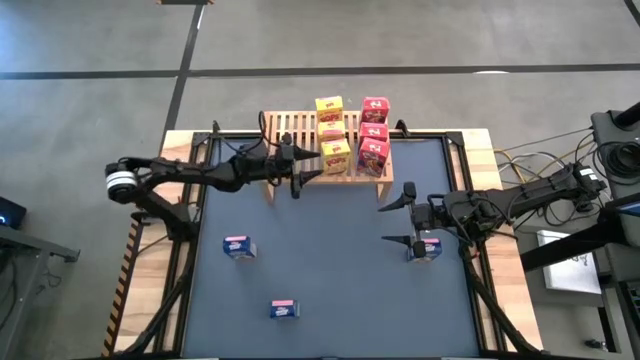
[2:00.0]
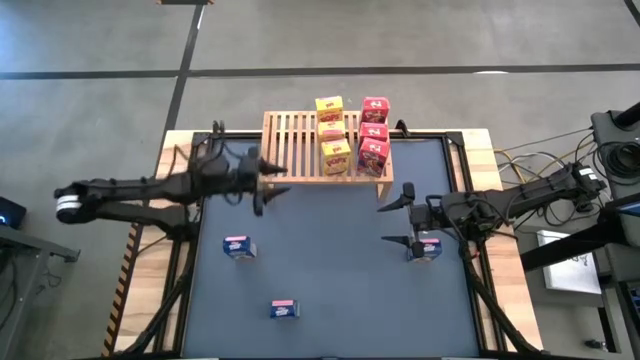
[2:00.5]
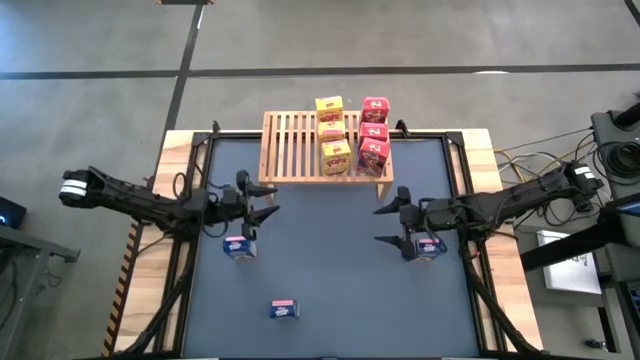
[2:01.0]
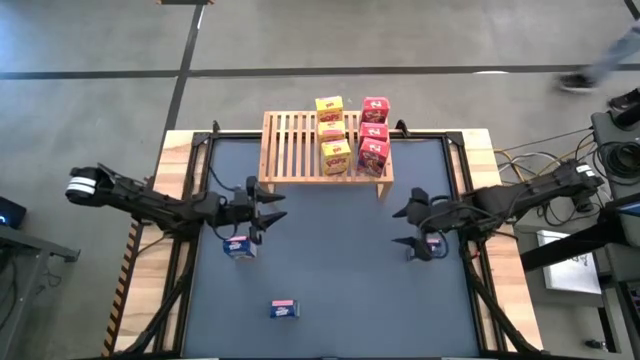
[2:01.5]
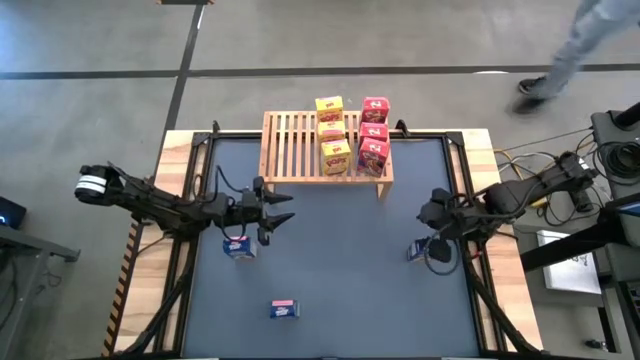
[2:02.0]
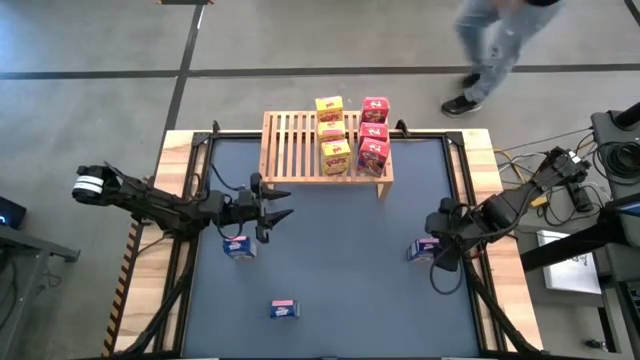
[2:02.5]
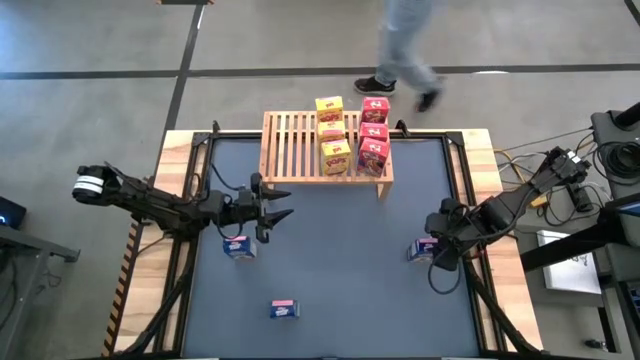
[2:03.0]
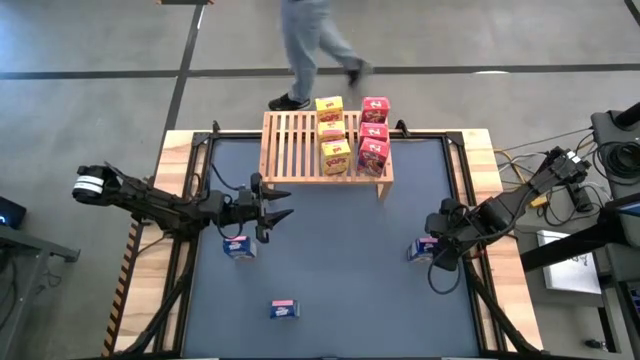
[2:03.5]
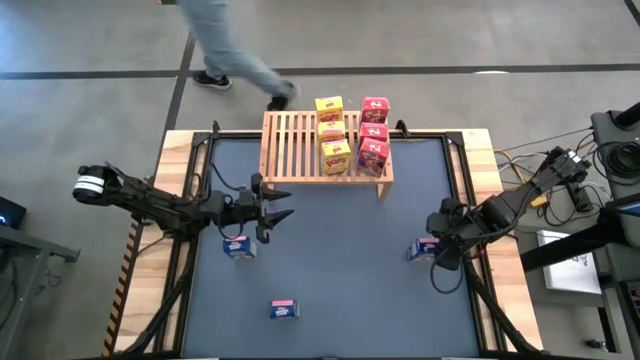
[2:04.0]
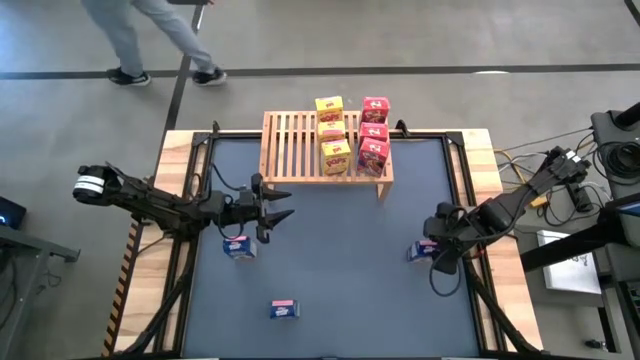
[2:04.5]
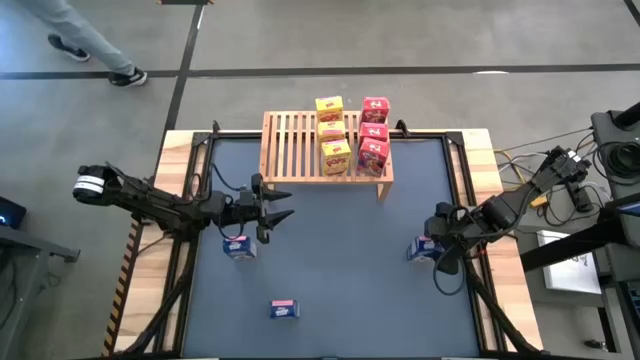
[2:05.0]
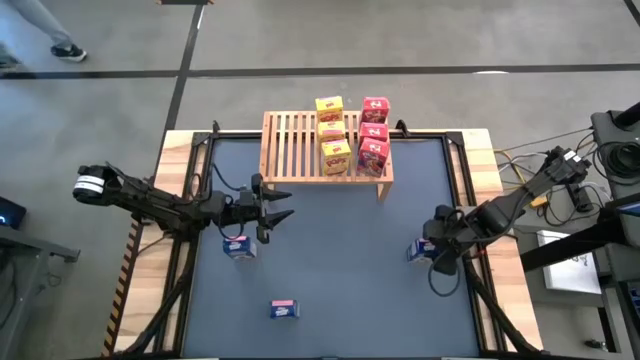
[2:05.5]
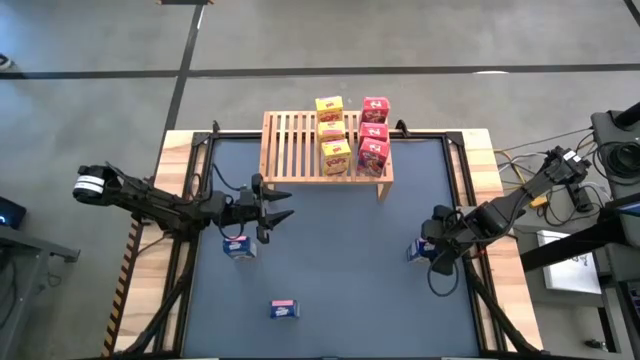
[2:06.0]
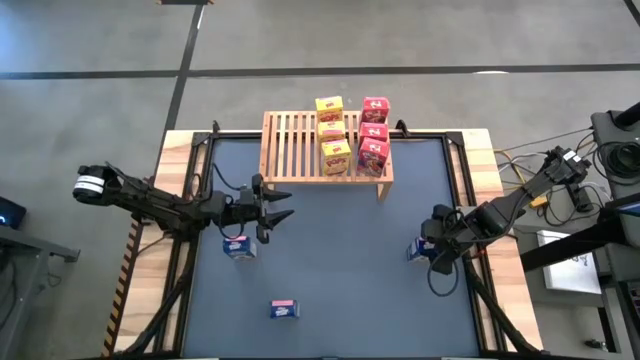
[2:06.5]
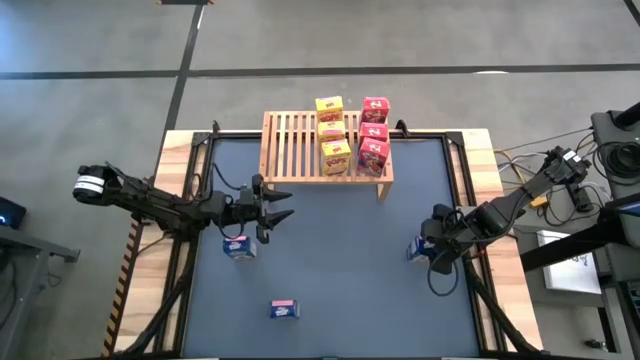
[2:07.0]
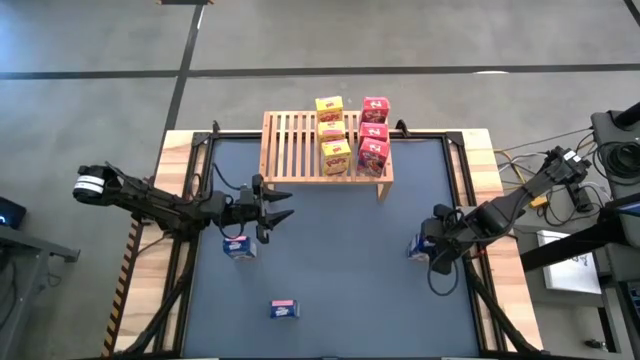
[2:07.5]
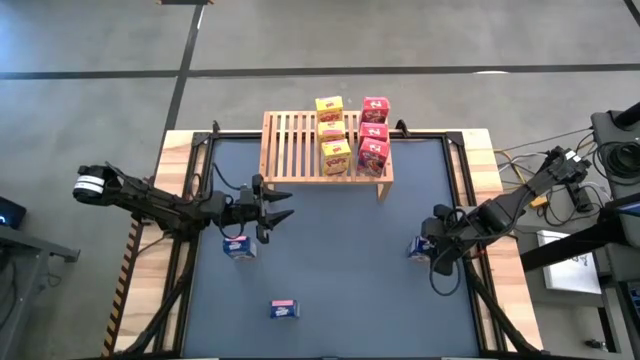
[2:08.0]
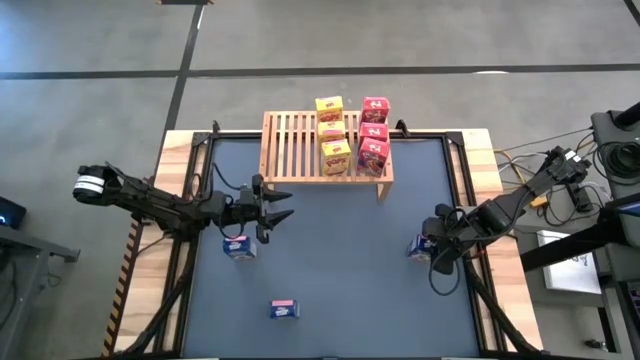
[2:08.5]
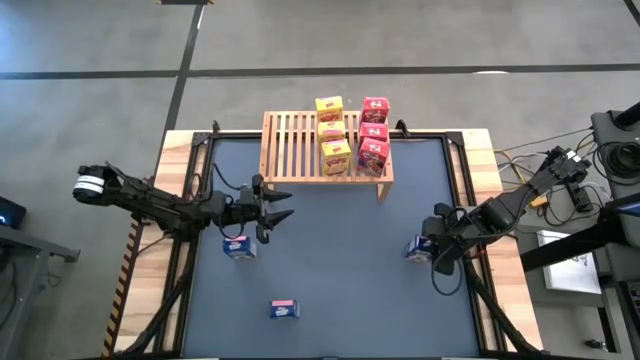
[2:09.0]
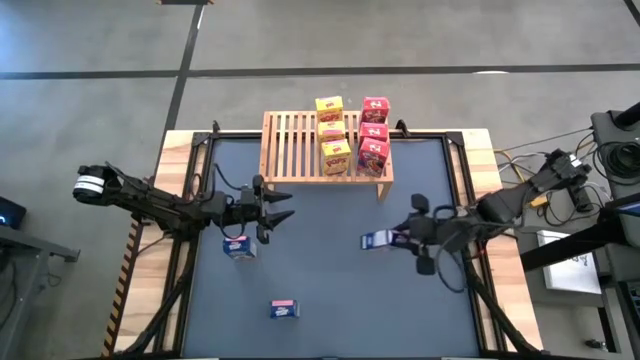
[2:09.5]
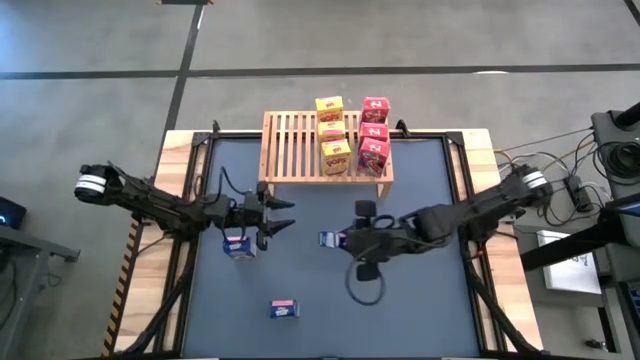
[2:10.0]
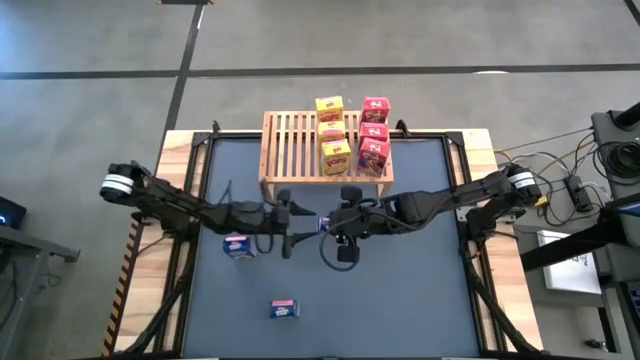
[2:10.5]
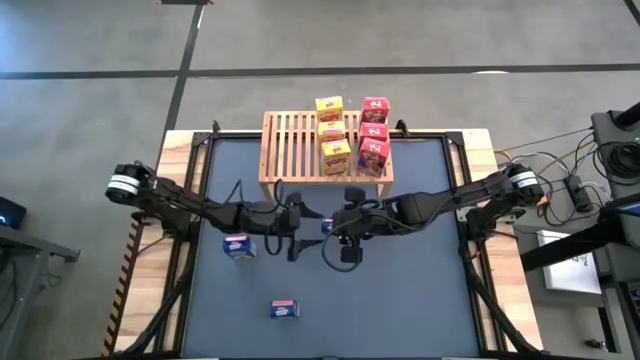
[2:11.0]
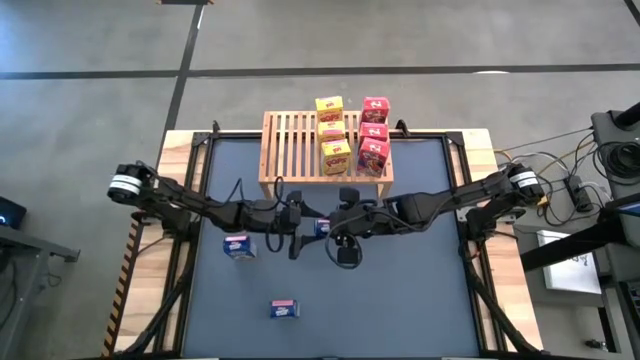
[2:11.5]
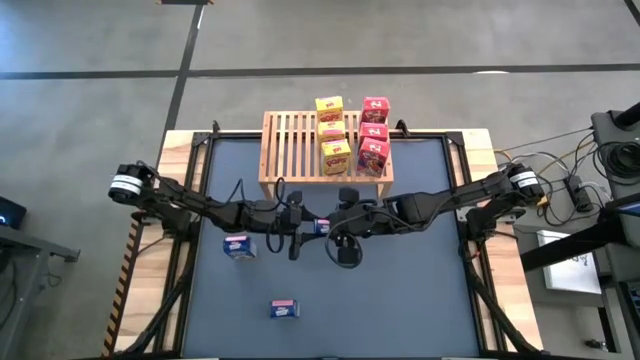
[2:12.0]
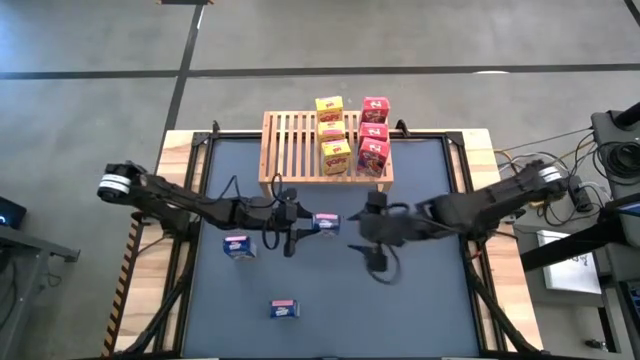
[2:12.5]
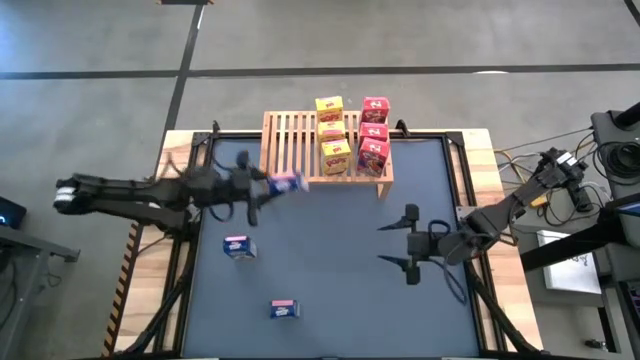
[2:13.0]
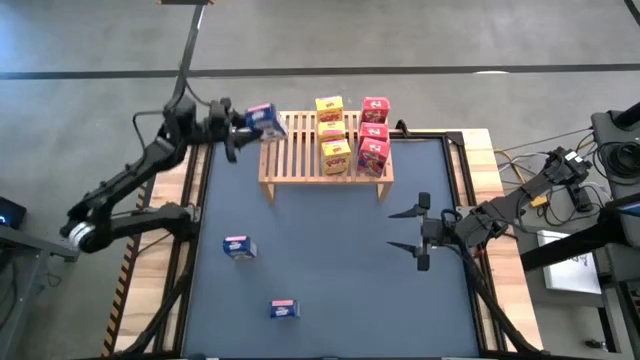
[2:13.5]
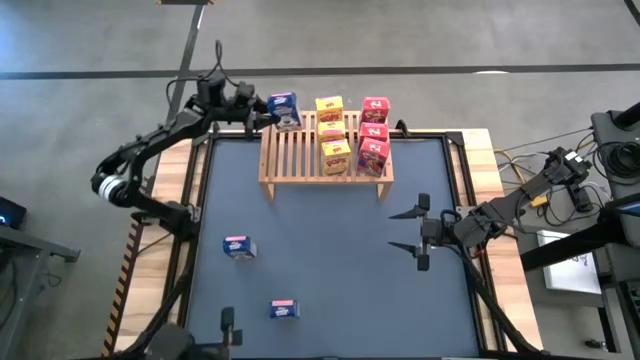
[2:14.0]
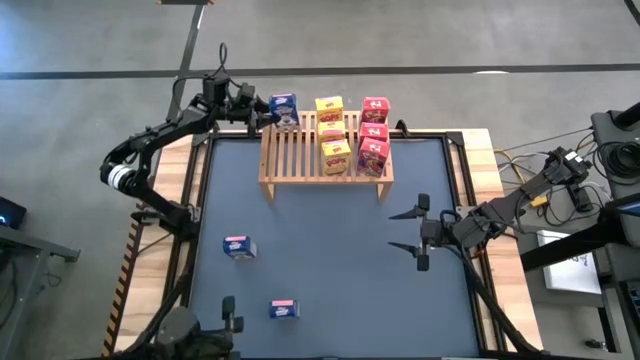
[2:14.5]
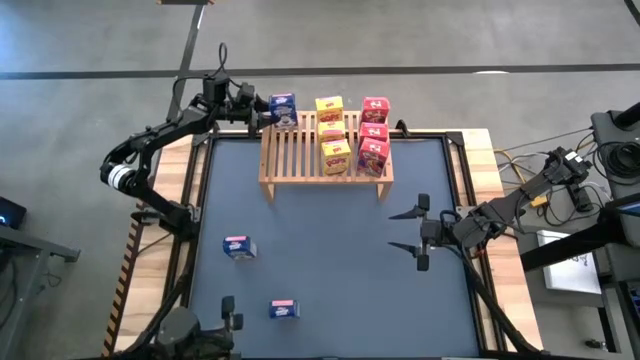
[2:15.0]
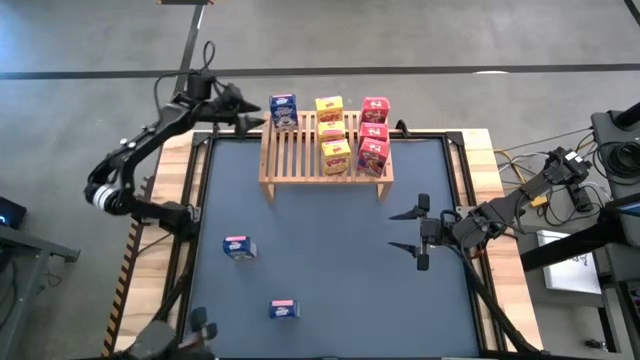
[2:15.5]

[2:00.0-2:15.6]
Task: Stack cereal on shelf
Put the top right blue cereal box on the shelf

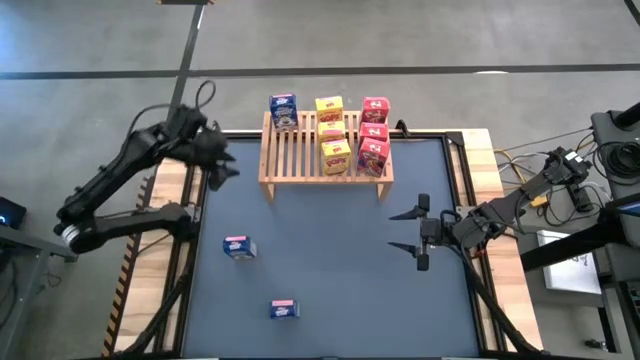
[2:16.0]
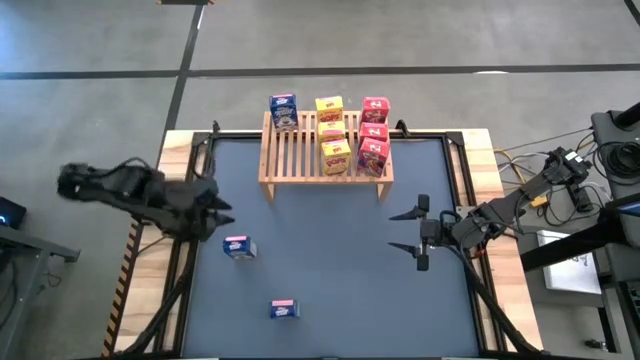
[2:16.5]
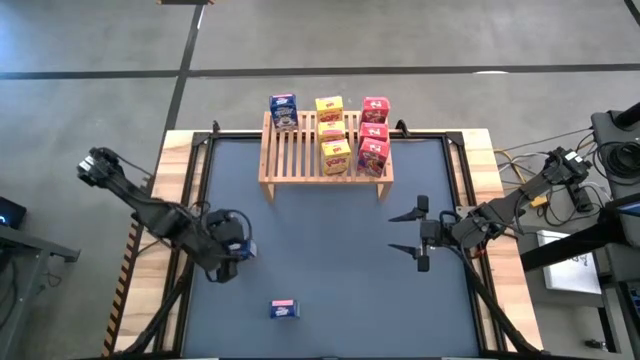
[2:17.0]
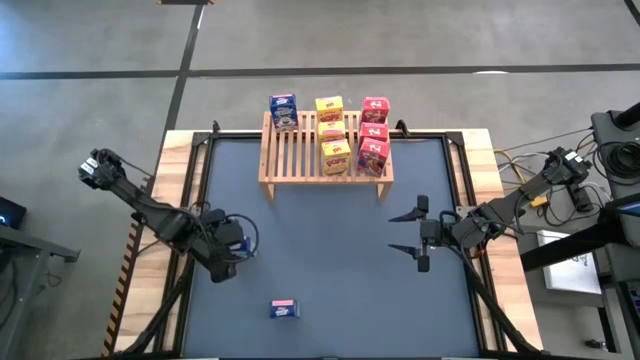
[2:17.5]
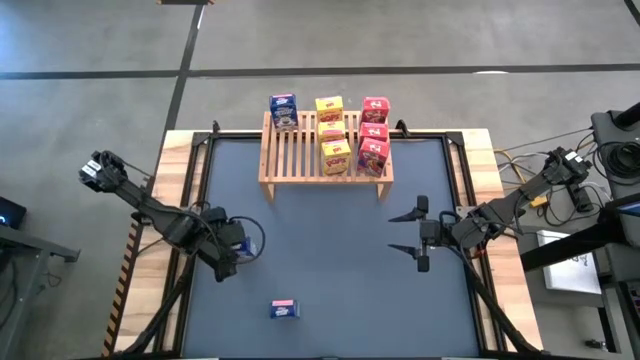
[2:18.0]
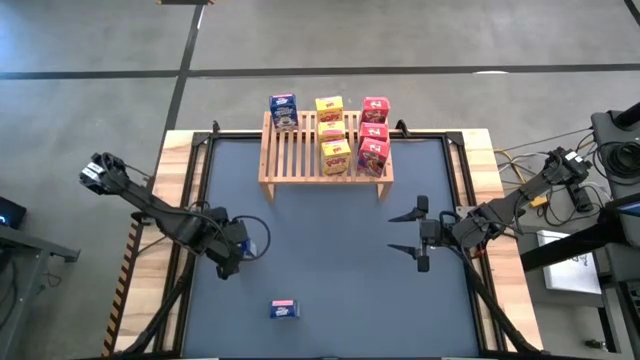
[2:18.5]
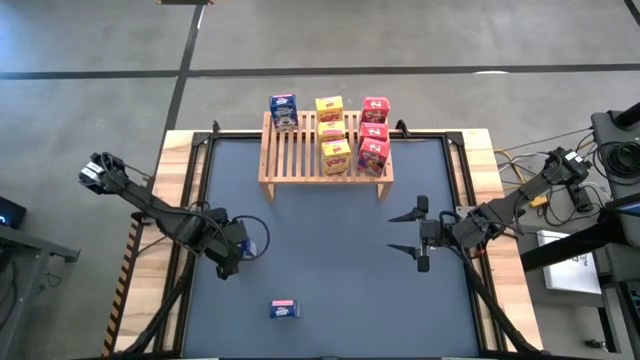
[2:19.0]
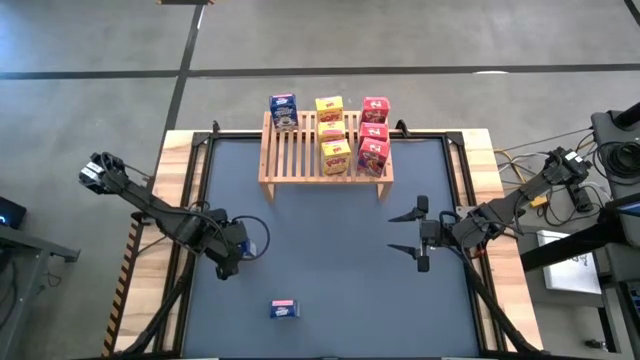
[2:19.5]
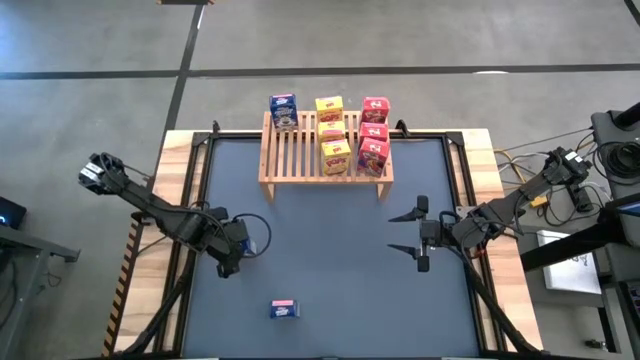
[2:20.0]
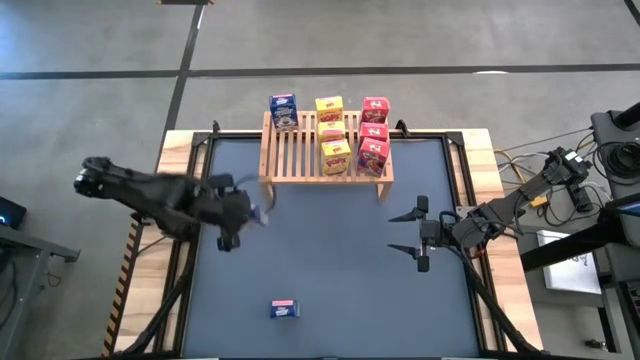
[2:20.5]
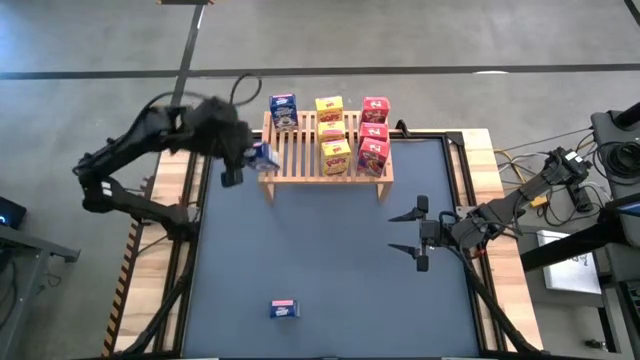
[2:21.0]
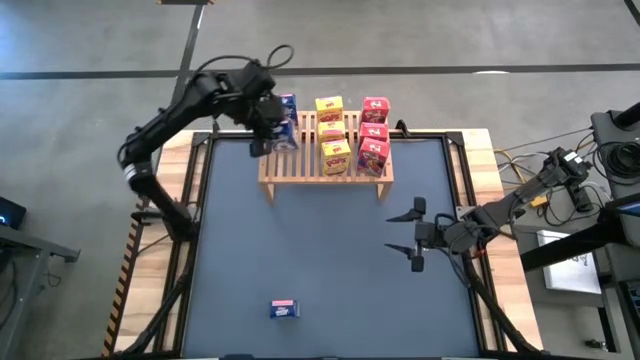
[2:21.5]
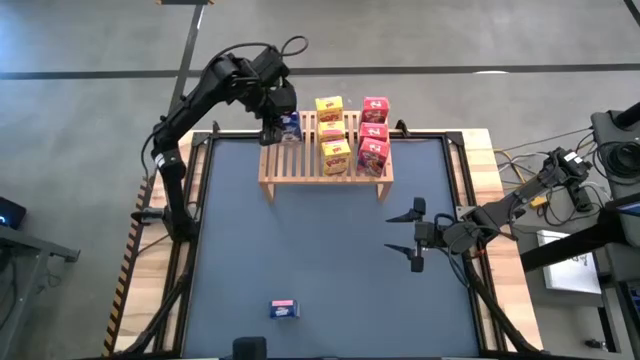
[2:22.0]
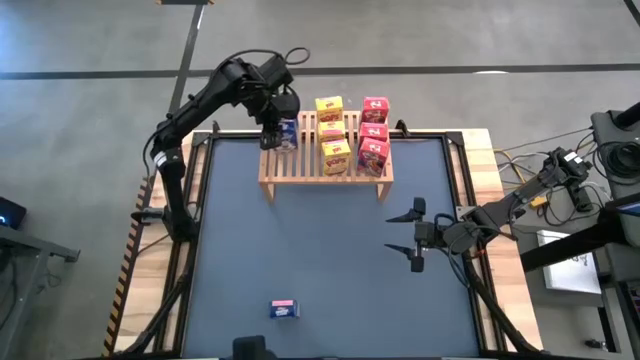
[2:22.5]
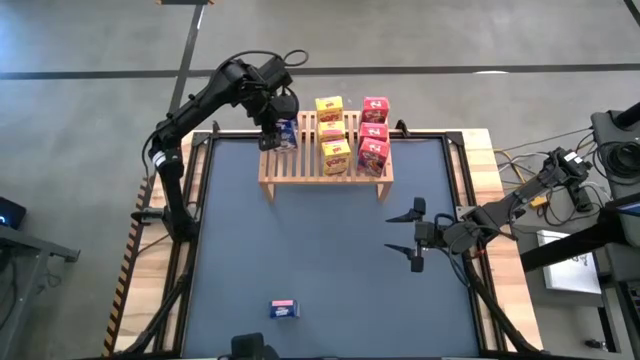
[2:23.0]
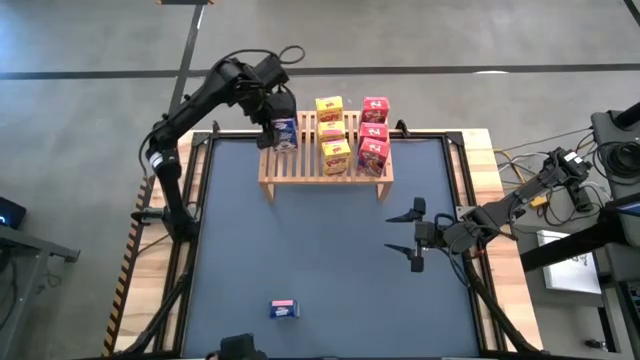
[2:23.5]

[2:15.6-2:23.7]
Put the top blue cereal box on the shelf aligned with the other blue cereal box
